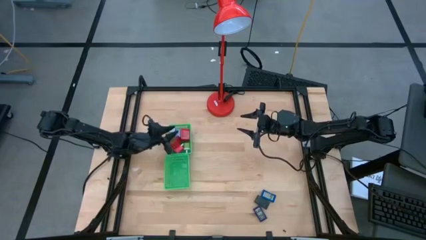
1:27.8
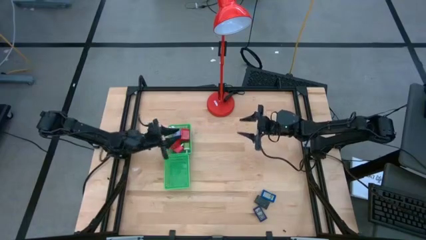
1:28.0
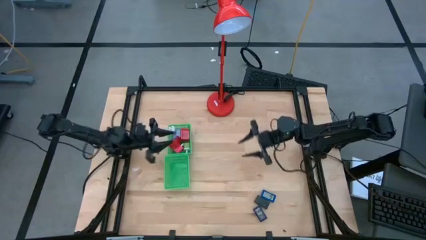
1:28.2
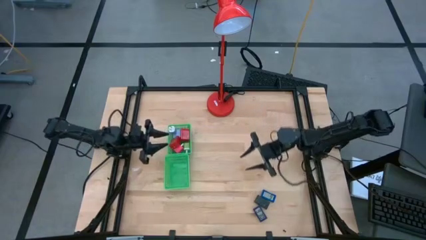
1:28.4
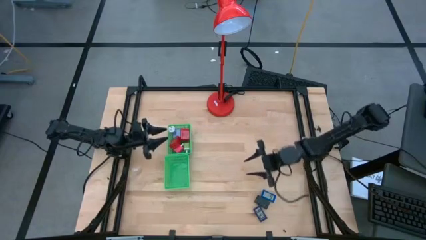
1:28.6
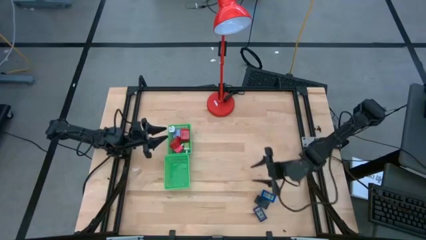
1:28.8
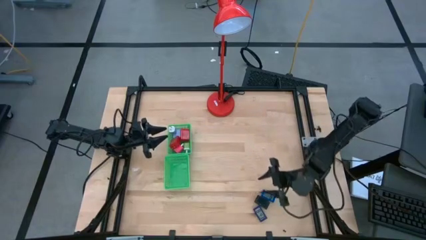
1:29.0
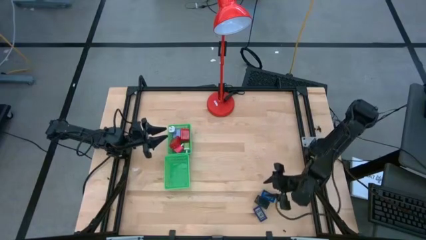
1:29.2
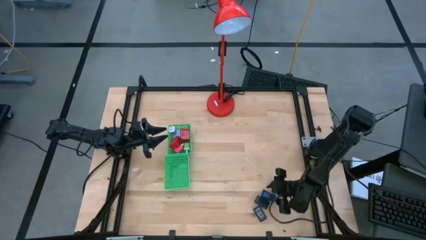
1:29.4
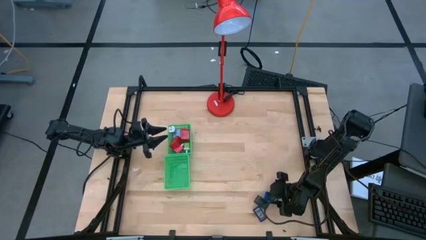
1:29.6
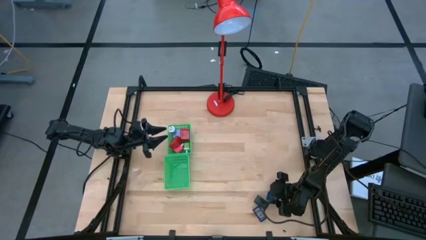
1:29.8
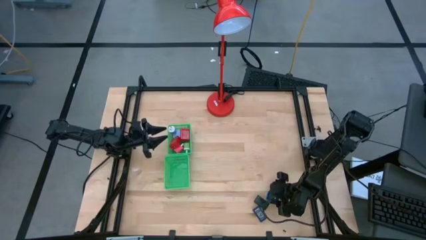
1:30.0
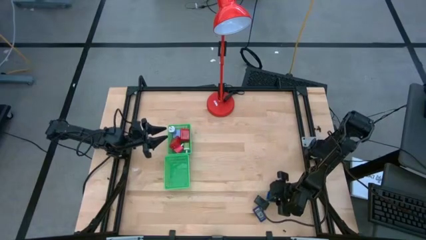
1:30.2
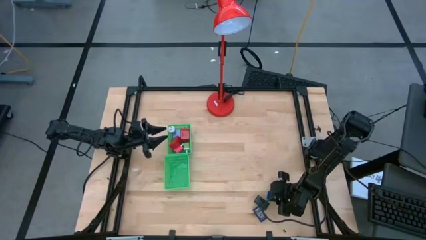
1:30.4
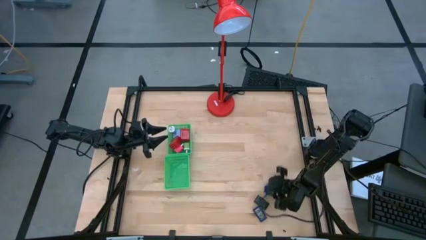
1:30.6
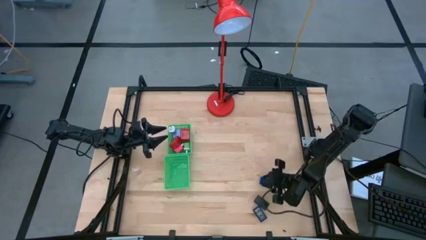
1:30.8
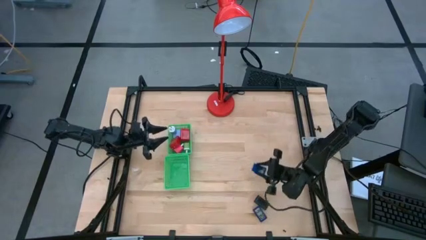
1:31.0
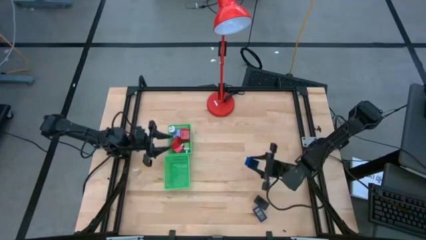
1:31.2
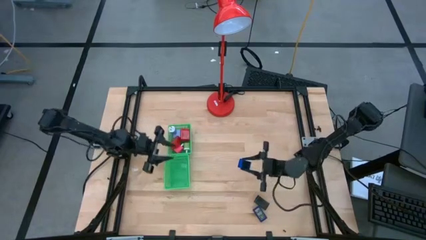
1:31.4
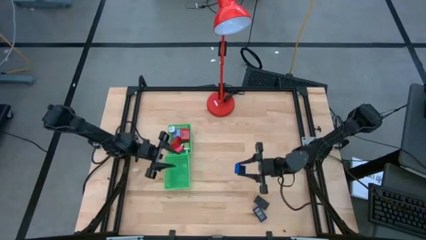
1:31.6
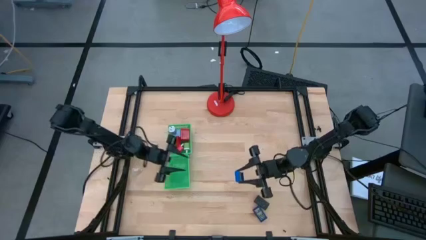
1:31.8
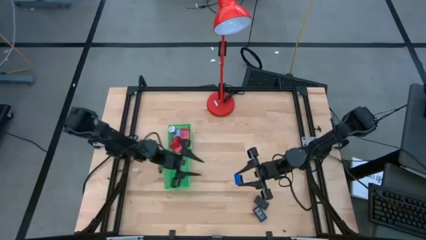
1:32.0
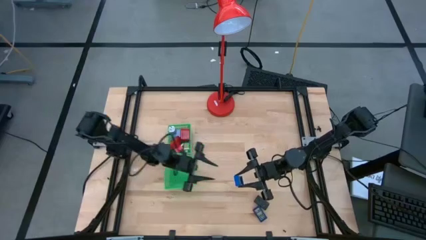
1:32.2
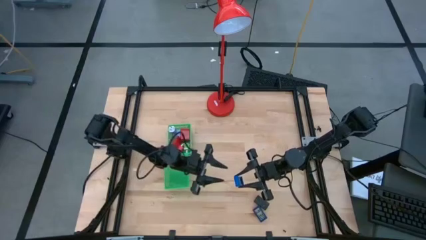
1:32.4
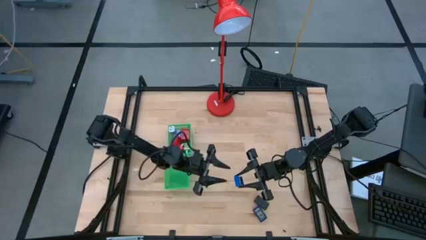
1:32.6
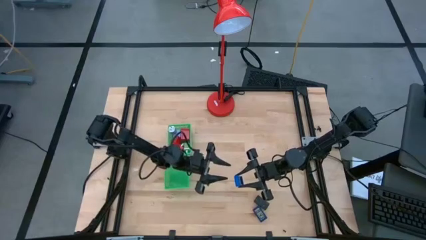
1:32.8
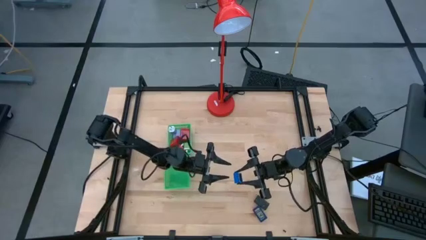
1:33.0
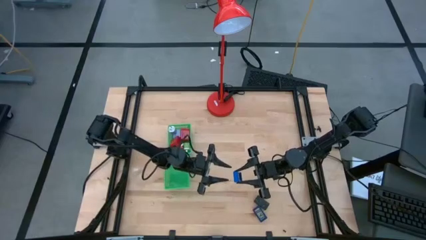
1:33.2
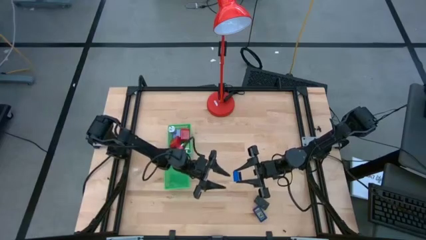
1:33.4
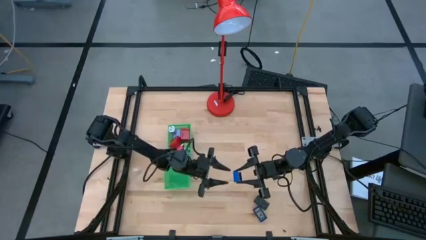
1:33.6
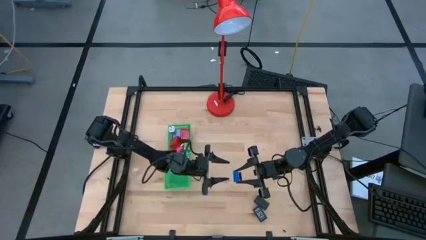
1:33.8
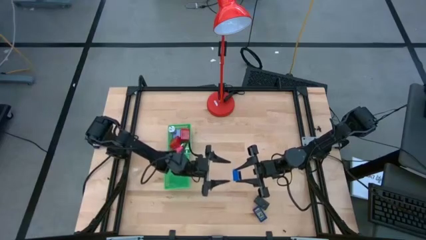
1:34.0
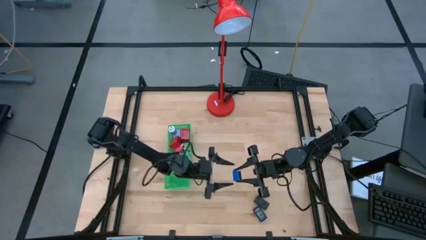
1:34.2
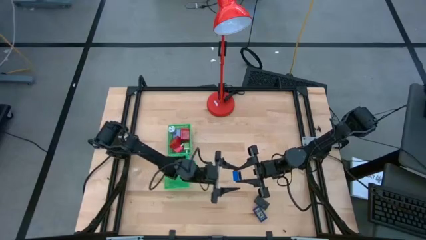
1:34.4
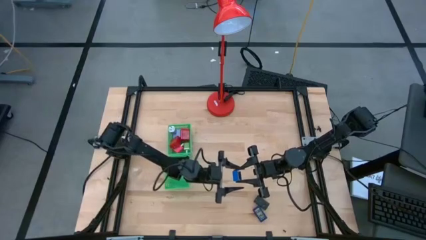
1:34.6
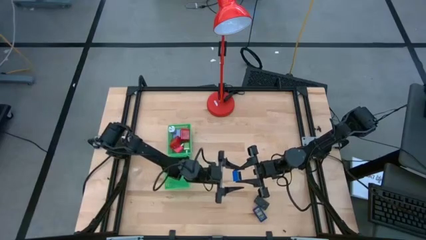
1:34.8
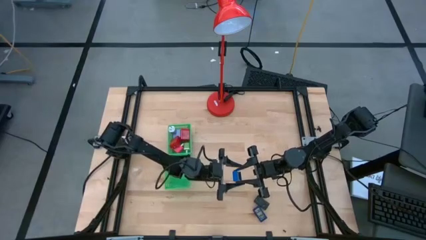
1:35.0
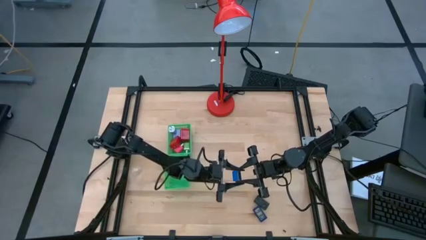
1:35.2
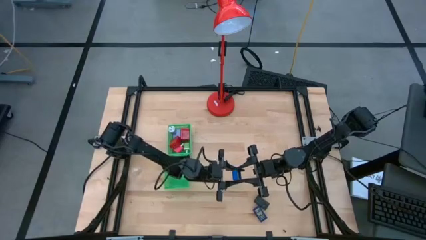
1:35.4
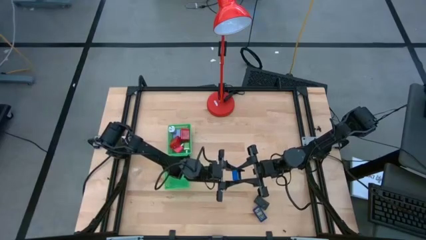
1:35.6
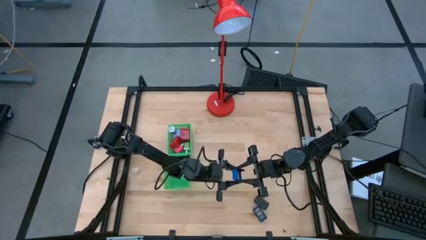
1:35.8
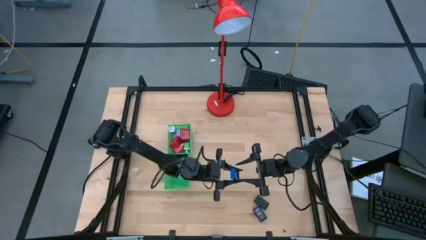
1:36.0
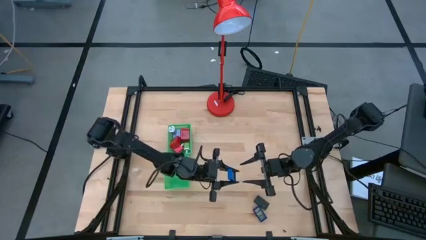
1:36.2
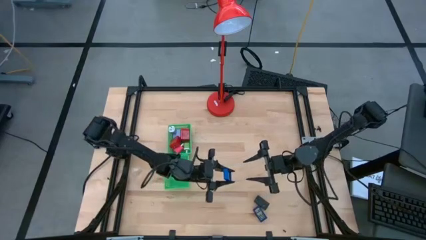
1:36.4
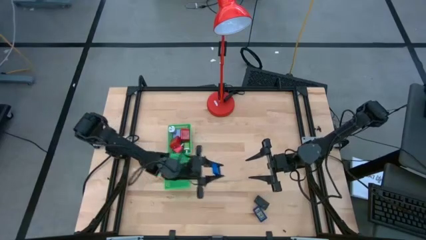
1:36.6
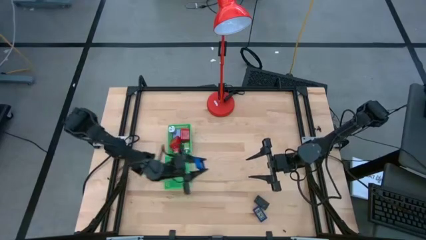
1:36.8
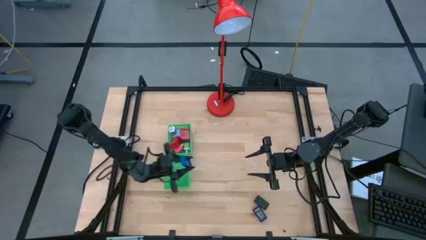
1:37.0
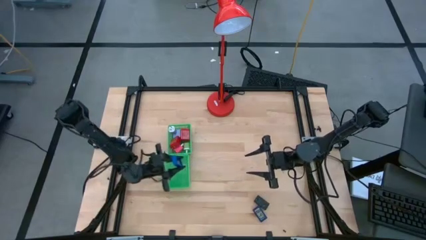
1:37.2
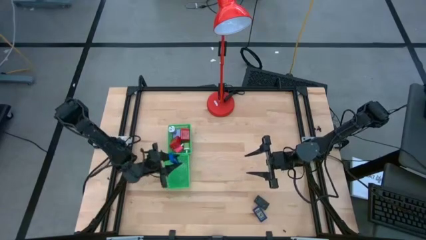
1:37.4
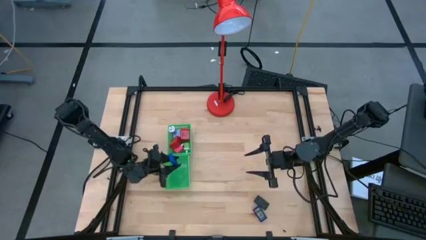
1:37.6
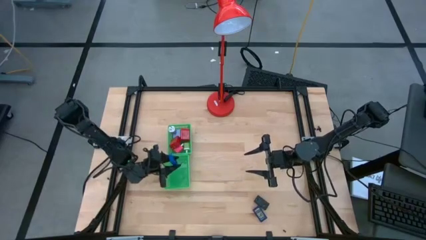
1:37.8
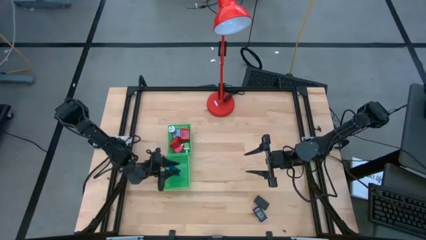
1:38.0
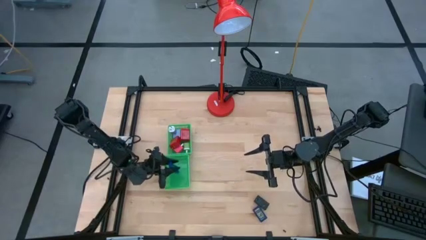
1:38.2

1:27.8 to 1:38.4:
Task: Pick & Place Office items
Put the top blue digital timer into the bottom green bin

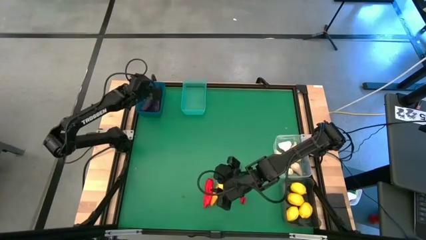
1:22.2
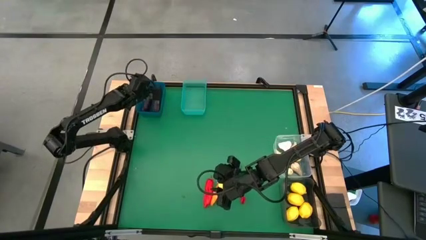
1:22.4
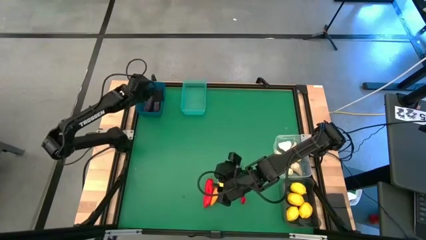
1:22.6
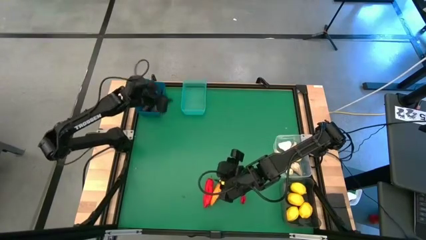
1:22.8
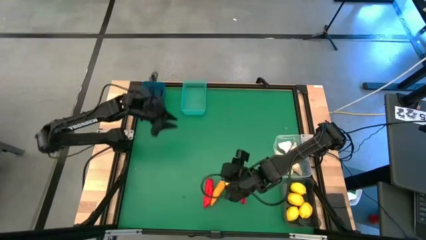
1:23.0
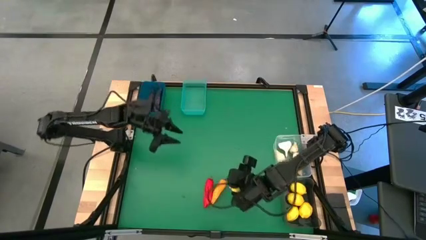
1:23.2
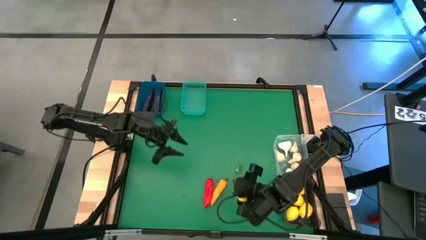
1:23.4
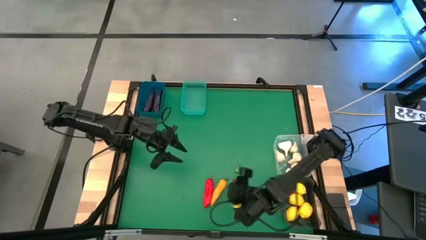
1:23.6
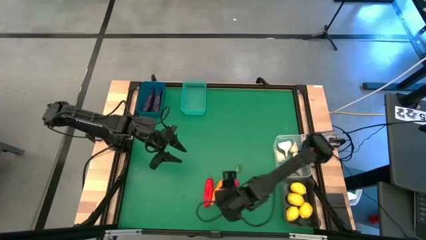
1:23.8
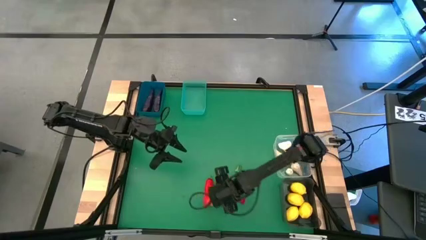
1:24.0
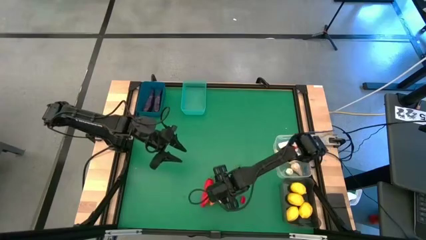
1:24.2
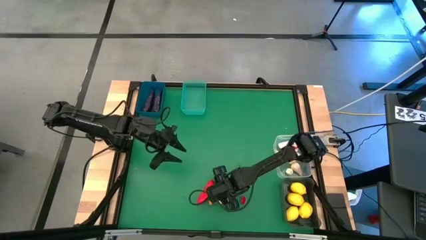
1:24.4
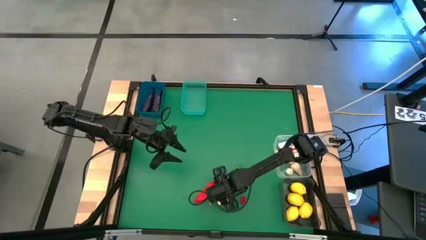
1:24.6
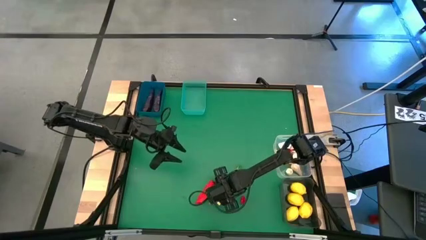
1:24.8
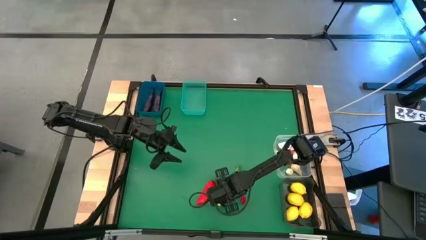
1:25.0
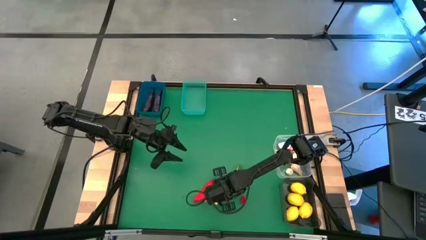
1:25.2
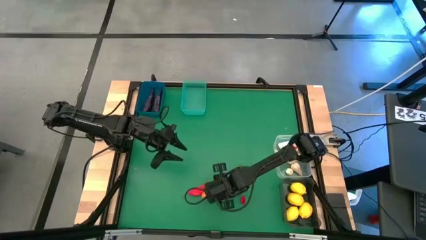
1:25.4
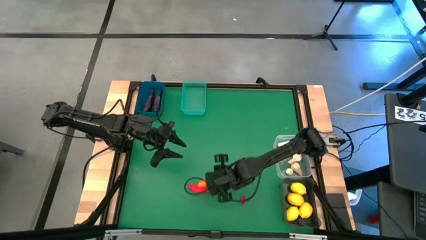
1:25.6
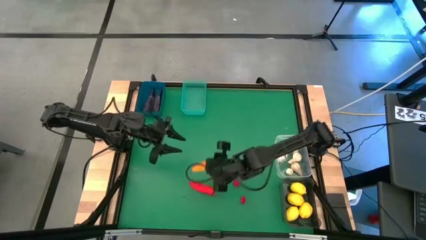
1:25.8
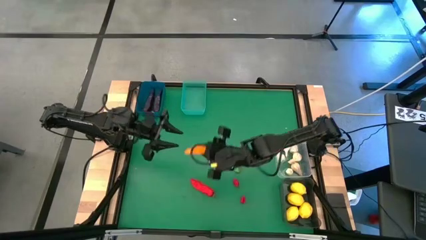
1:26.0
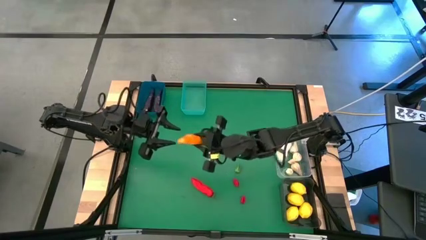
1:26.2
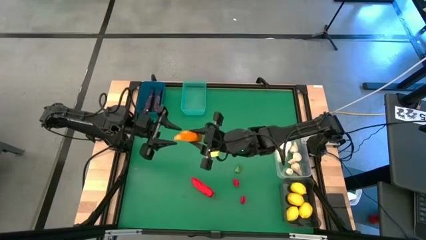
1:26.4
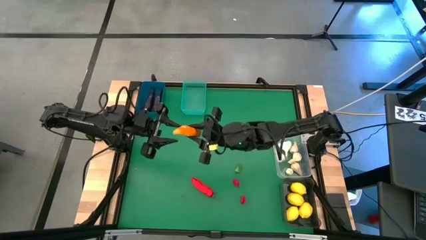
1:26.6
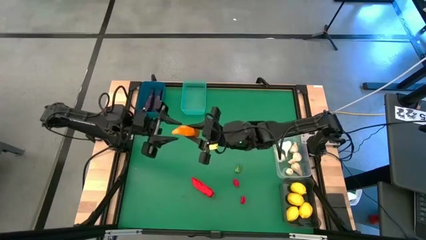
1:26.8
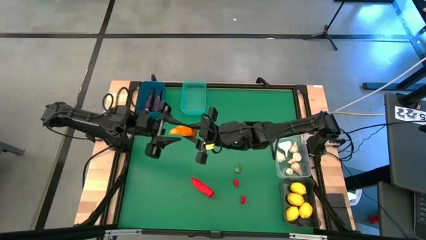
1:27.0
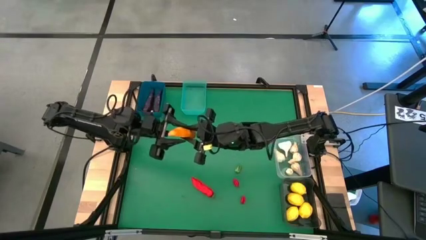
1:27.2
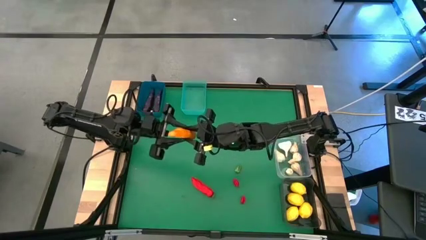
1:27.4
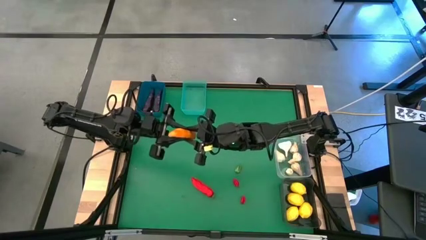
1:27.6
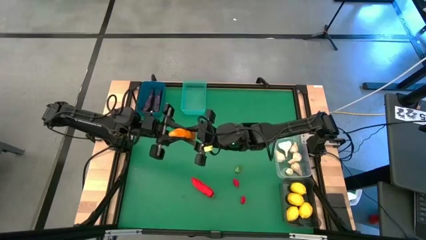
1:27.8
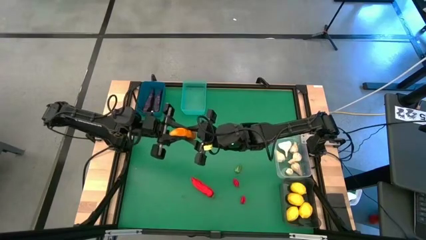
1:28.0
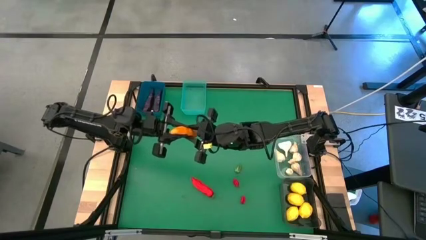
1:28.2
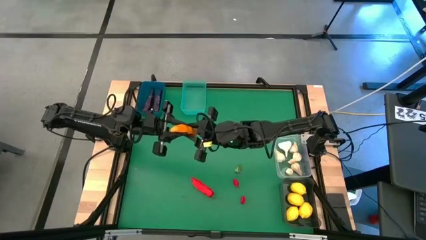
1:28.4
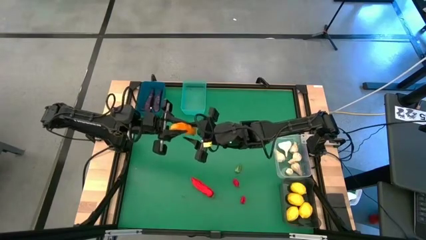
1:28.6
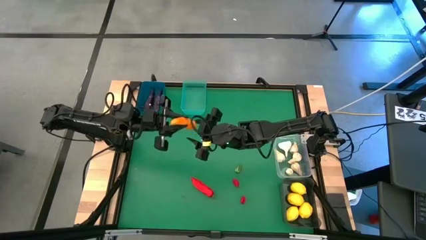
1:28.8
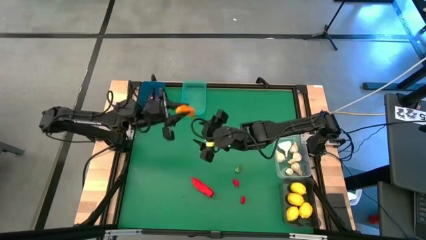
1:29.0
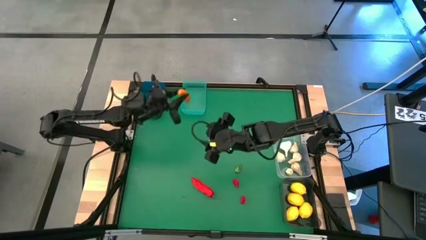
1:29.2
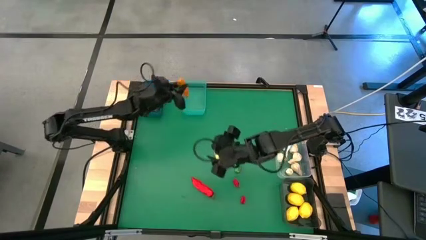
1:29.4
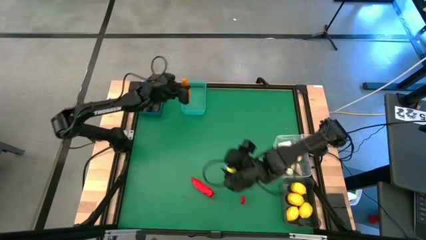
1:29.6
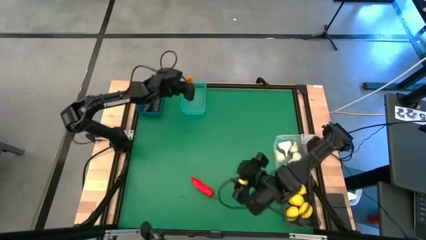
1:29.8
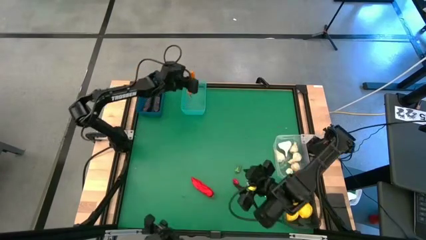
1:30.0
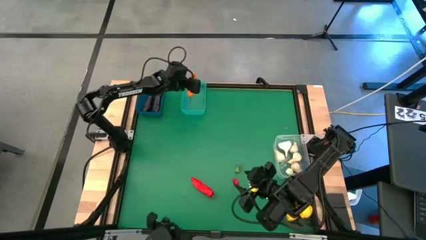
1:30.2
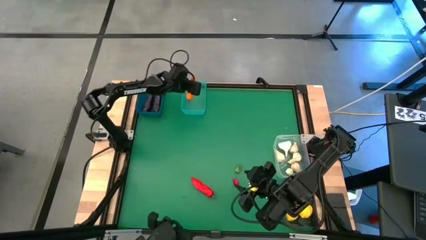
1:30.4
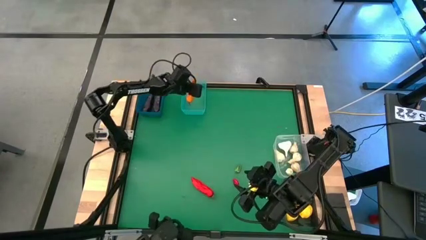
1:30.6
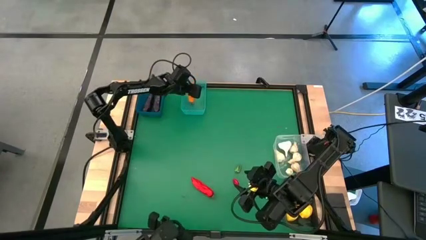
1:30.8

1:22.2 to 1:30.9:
Task: Sort produce into baskets
Put the yellow pepper into the green bin
